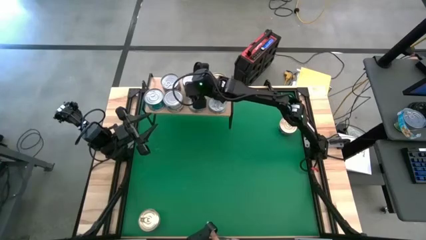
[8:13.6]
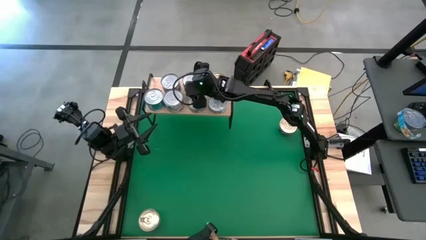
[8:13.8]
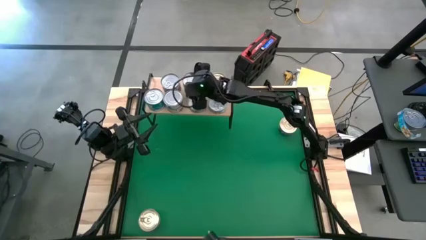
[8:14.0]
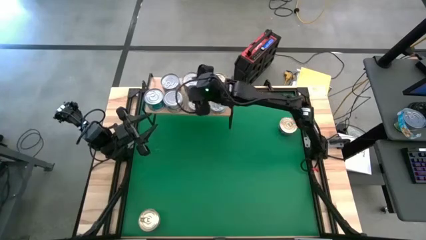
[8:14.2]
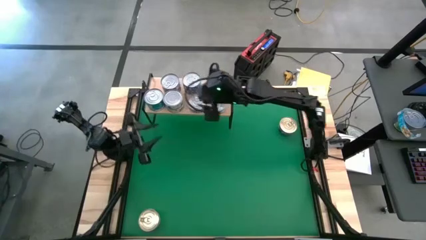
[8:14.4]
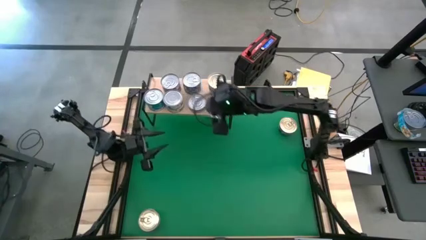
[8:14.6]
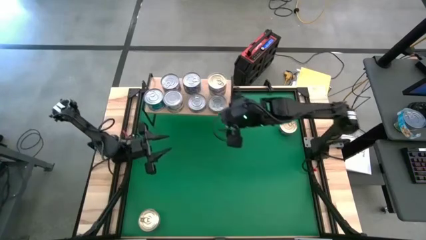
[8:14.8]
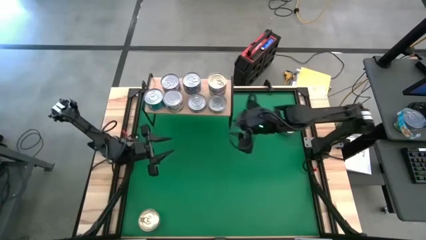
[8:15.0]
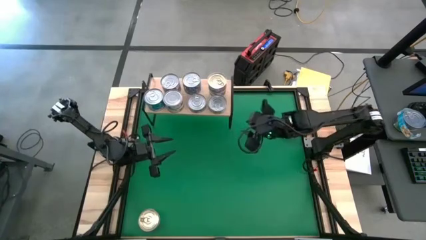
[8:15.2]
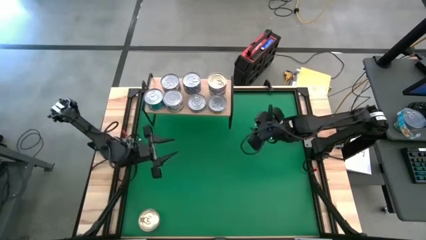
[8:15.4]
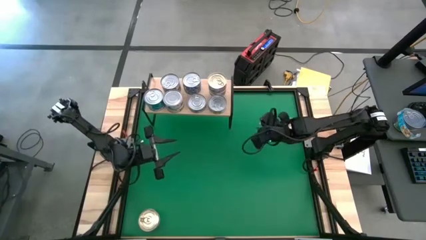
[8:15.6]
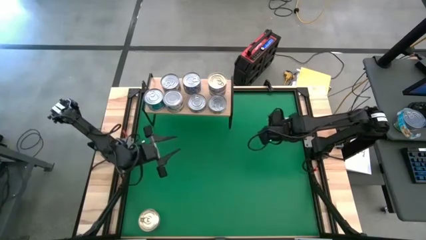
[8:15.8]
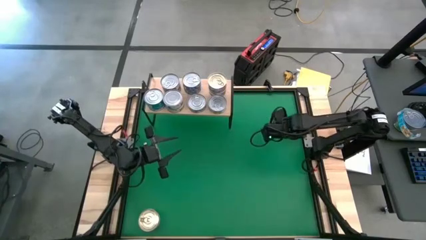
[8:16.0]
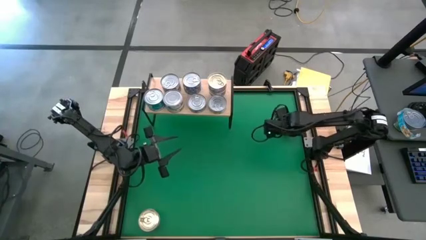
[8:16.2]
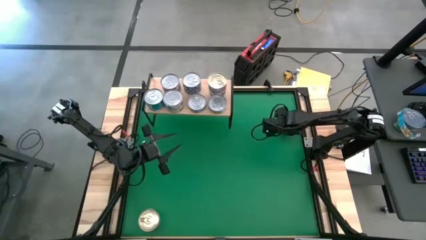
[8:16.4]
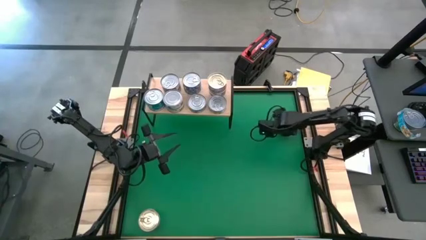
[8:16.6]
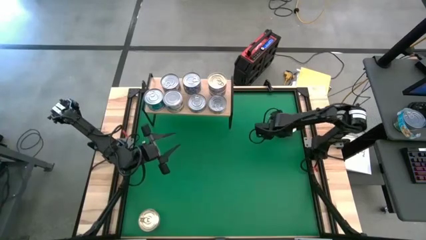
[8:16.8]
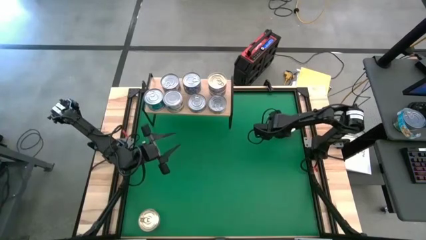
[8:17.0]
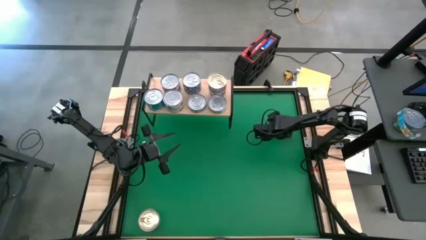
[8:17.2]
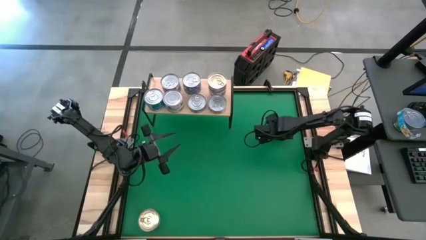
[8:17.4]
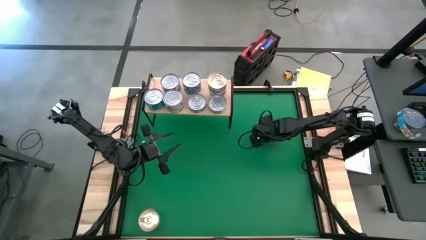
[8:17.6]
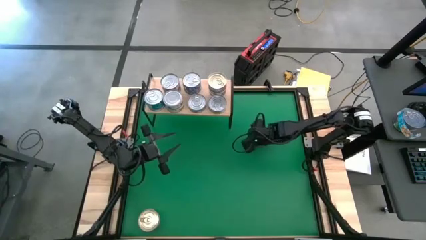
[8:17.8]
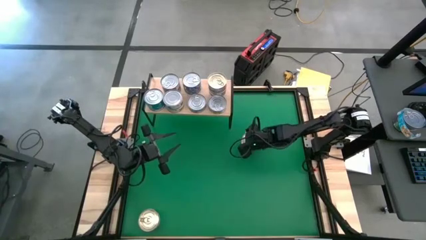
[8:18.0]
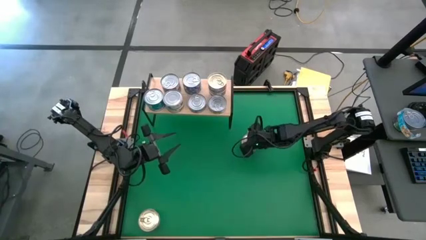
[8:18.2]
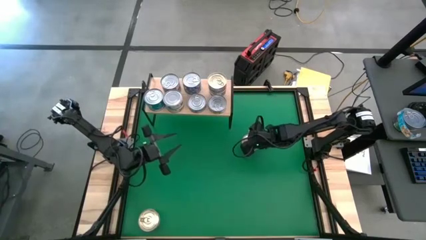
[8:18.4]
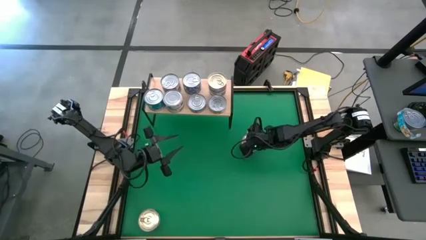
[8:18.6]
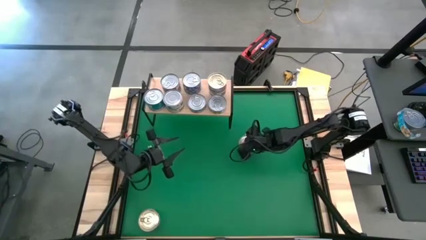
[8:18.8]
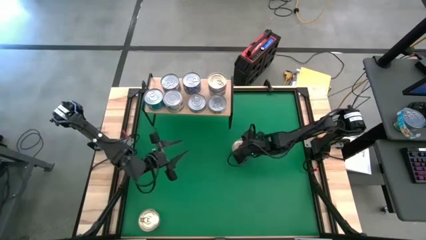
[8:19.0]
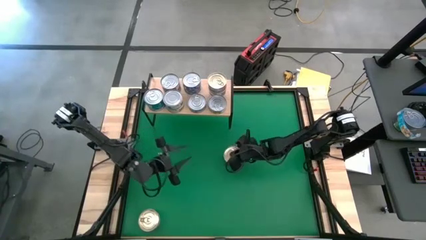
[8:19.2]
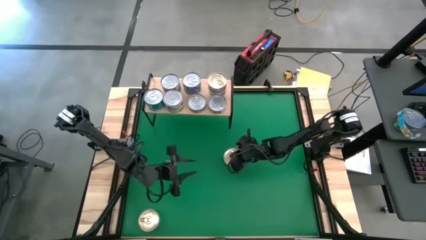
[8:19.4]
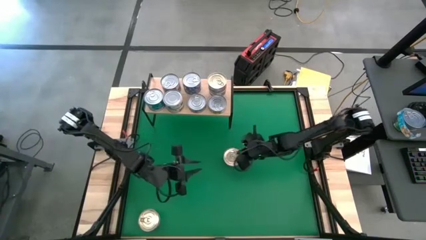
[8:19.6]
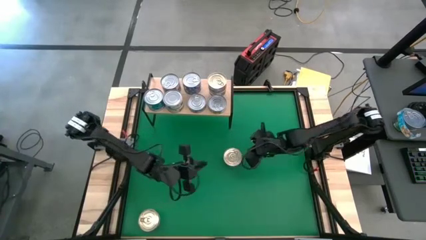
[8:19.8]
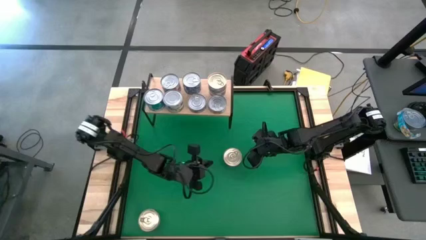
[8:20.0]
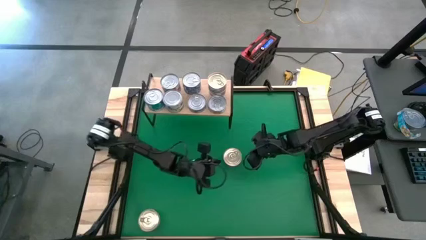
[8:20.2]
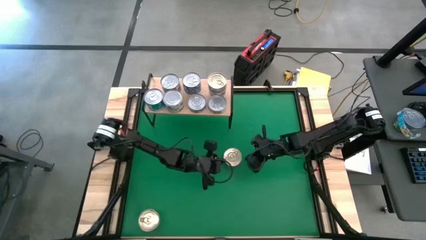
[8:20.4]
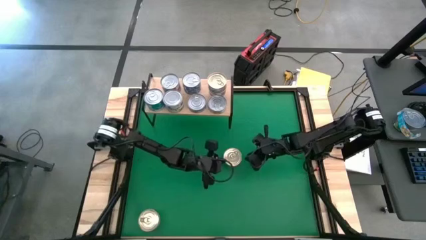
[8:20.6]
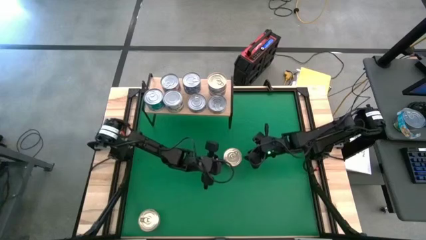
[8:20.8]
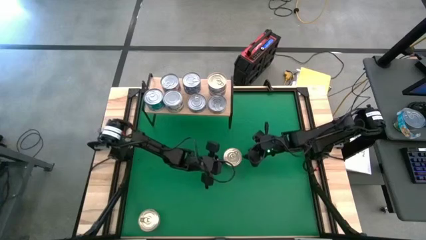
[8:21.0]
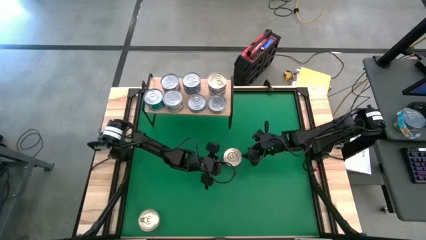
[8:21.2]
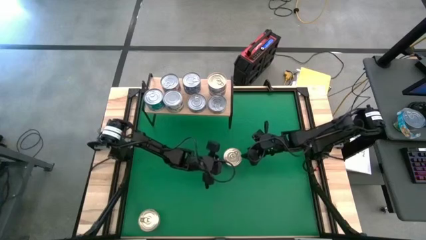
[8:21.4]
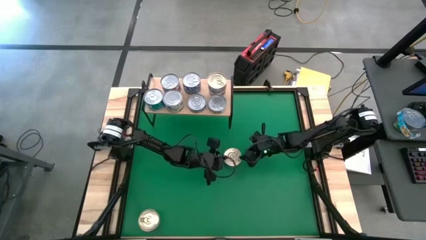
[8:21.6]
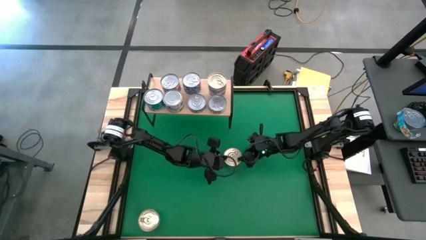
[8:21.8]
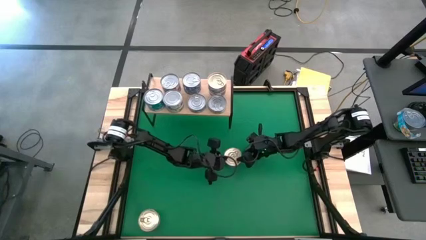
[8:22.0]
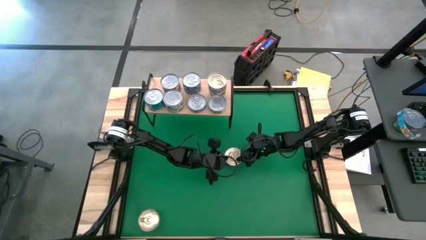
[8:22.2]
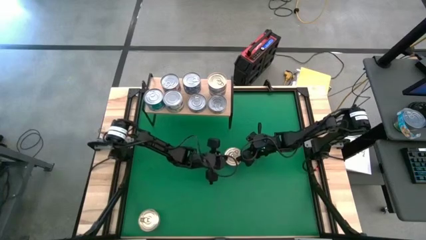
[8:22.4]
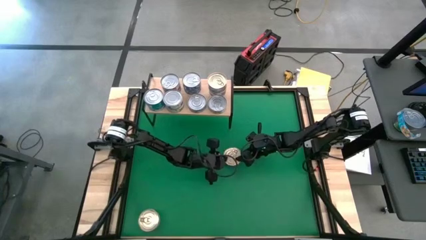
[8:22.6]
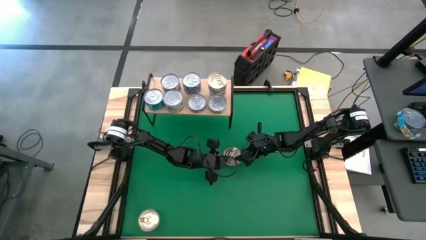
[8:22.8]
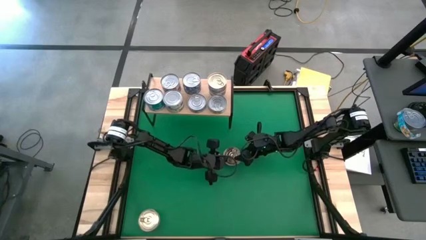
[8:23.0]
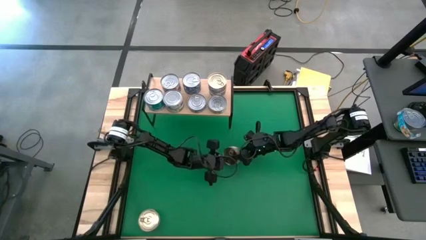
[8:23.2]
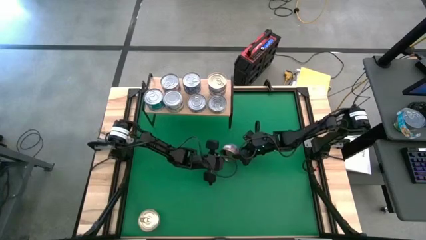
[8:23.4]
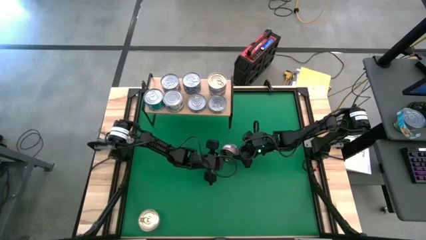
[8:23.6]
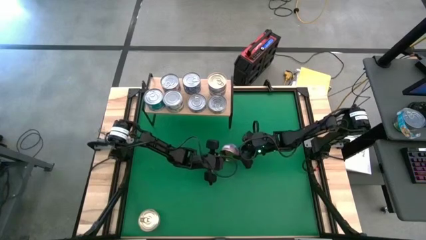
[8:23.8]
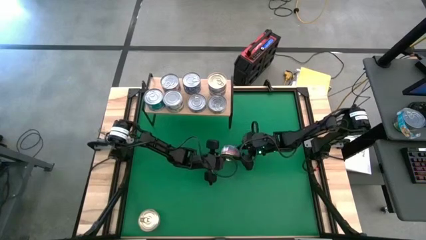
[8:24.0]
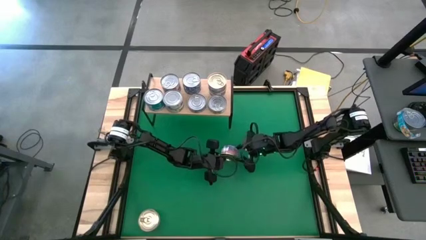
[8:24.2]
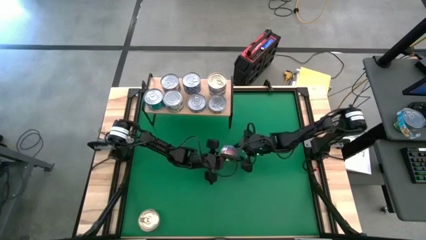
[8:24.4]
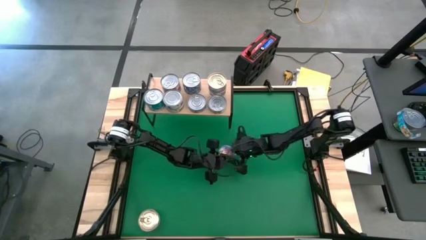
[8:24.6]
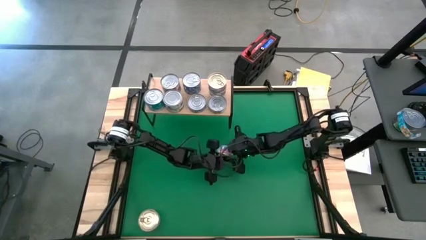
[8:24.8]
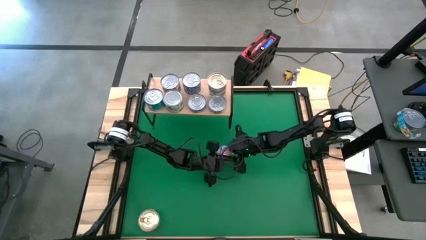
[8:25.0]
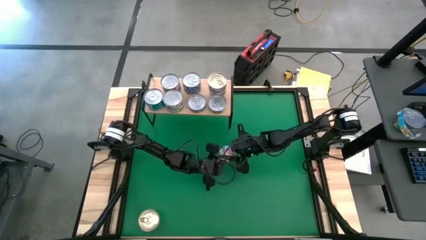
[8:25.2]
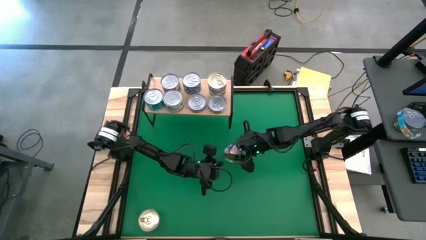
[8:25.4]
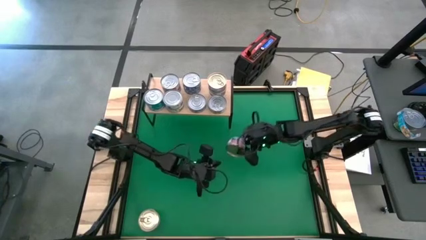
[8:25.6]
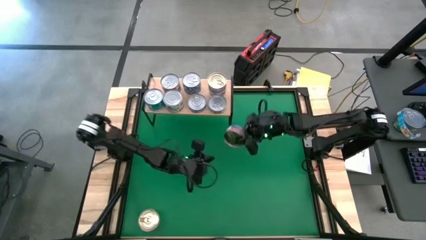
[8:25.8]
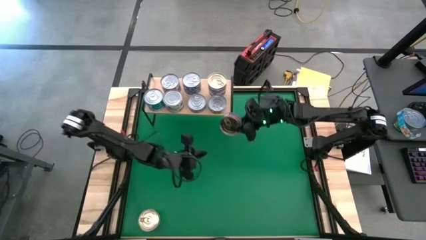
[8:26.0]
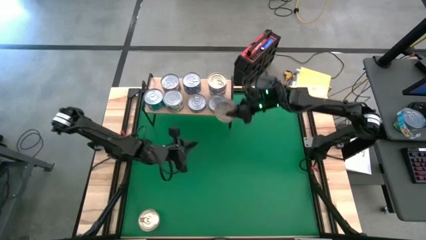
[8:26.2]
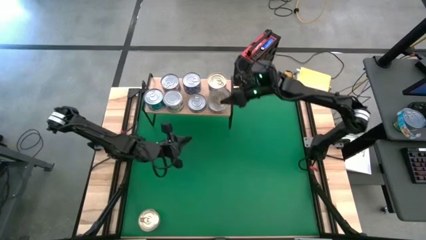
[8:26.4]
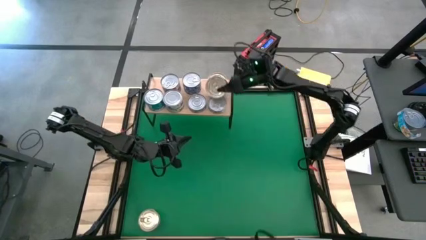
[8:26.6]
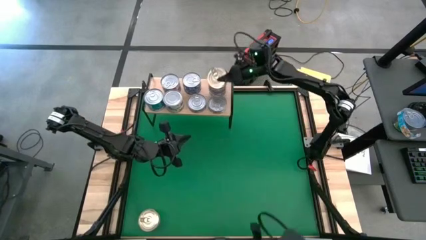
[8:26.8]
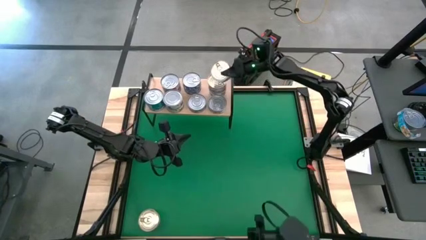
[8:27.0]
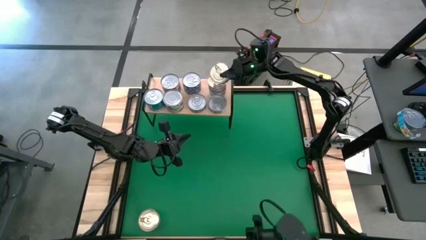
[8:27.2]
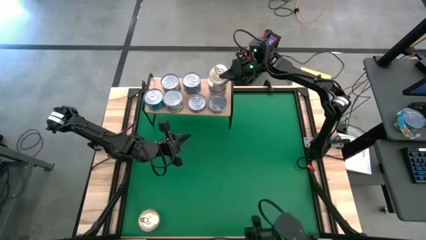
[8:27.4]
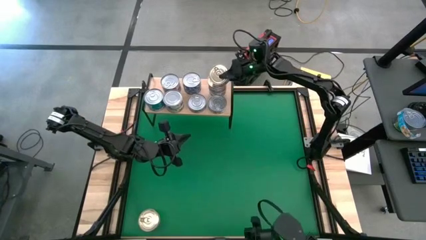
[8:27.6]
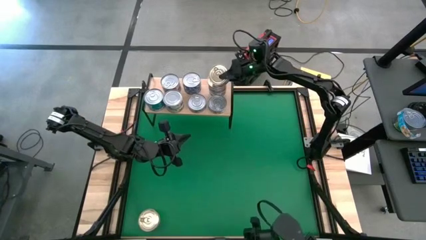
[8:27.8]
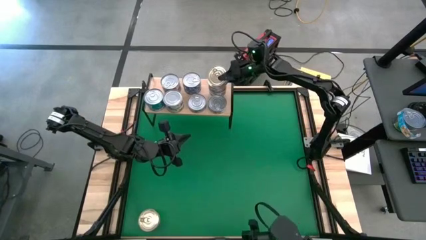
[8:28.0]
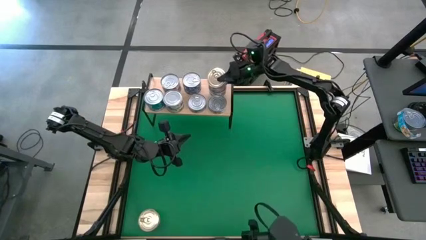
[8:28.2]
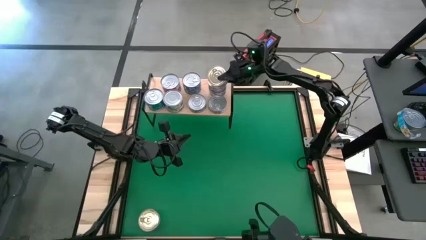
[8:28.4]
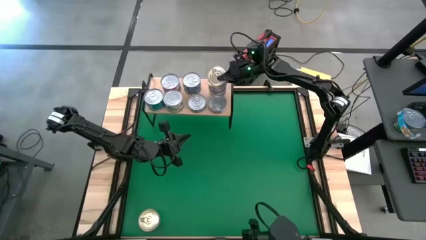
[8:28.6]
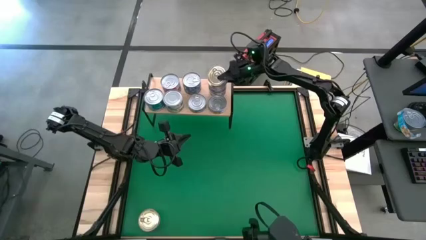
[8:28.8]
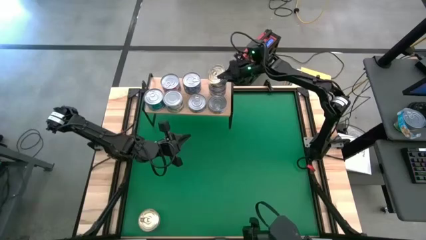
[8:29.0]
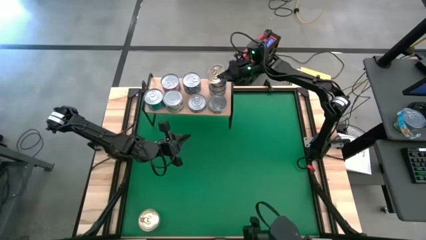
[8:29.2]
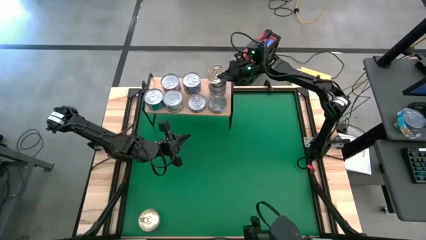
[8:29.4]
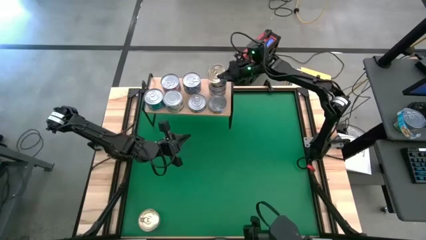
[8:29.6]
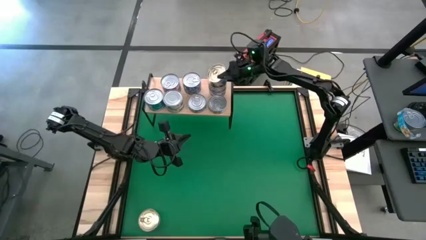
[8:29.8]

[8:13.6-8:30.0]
Task: Stack canned seafood by type on shelf
Stack the center blue tuna can on top of the blue tuna can on the shelf
